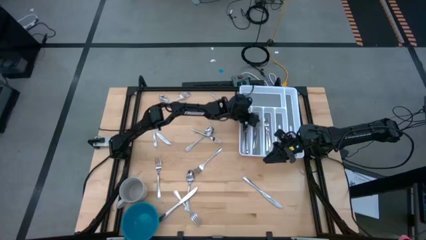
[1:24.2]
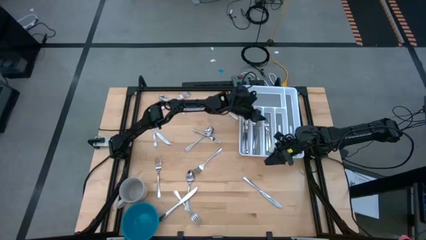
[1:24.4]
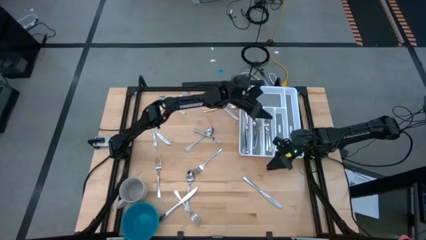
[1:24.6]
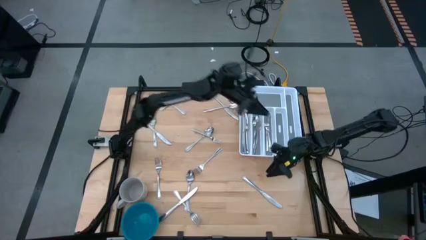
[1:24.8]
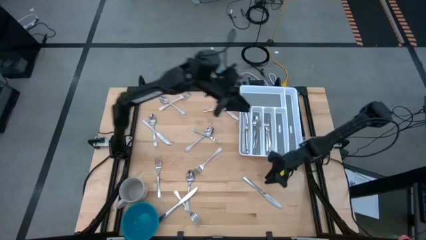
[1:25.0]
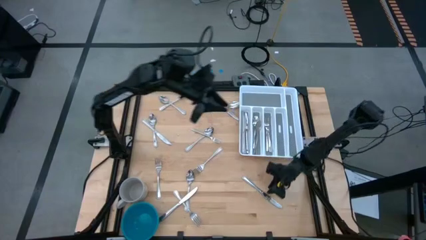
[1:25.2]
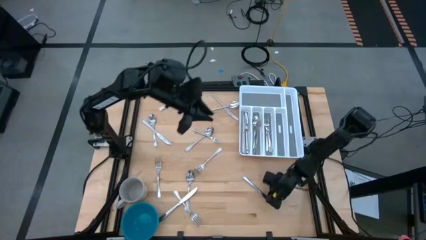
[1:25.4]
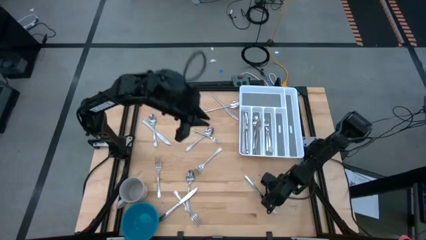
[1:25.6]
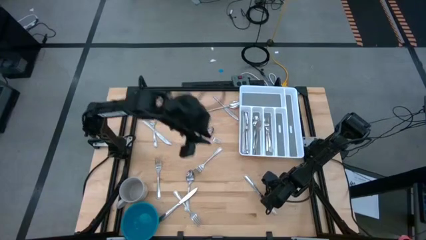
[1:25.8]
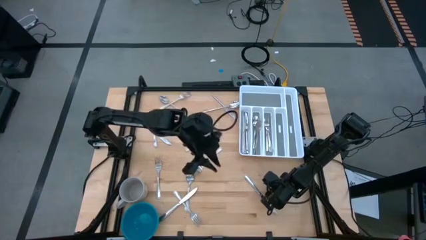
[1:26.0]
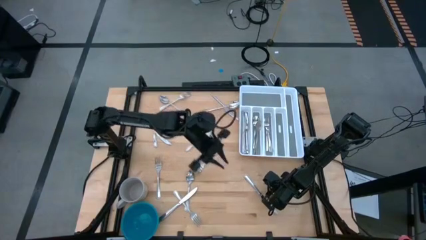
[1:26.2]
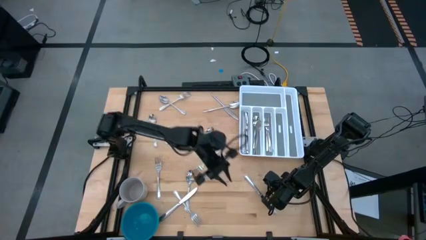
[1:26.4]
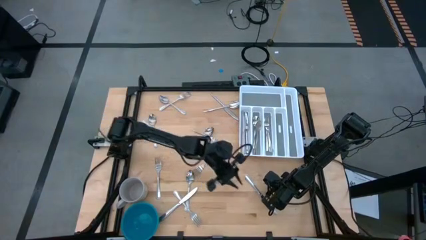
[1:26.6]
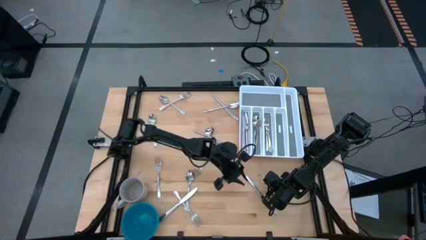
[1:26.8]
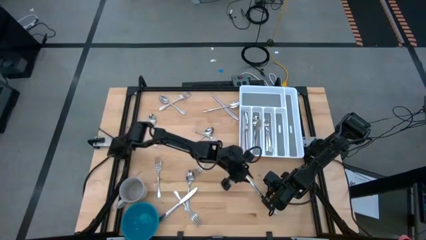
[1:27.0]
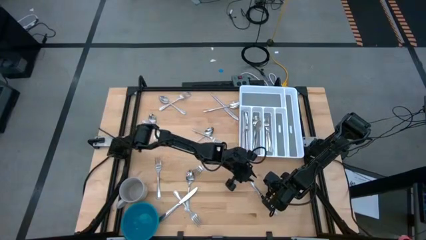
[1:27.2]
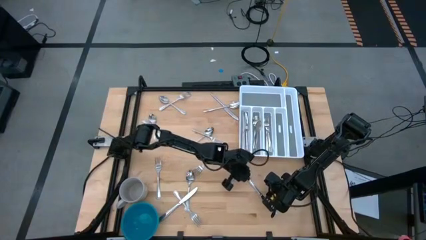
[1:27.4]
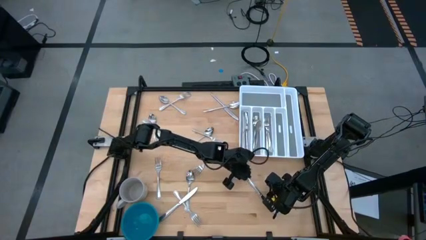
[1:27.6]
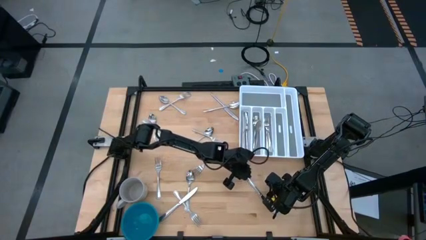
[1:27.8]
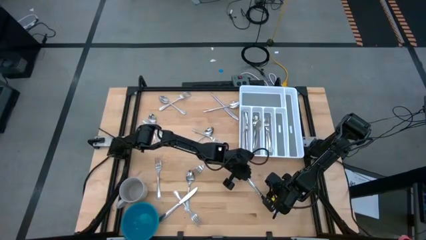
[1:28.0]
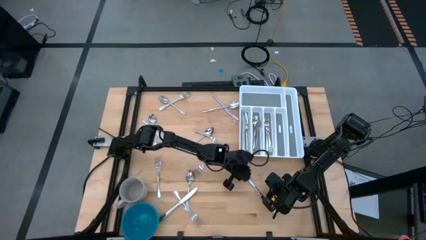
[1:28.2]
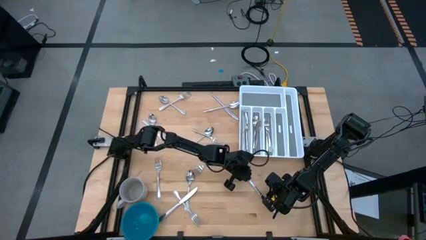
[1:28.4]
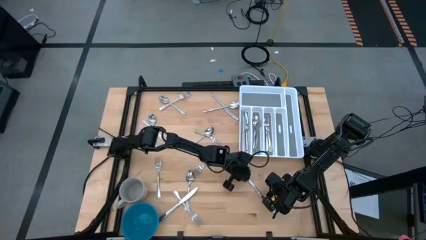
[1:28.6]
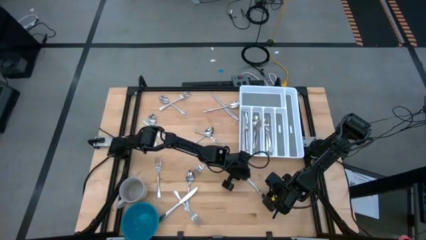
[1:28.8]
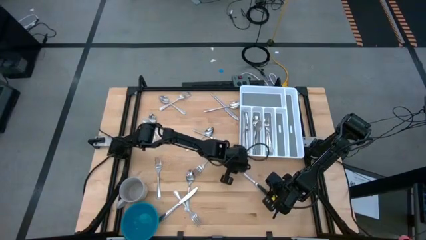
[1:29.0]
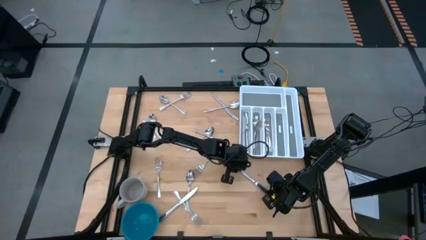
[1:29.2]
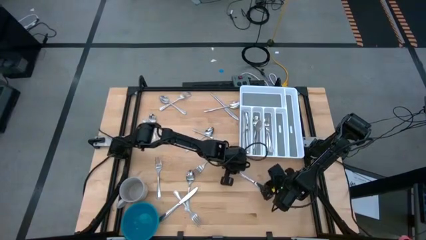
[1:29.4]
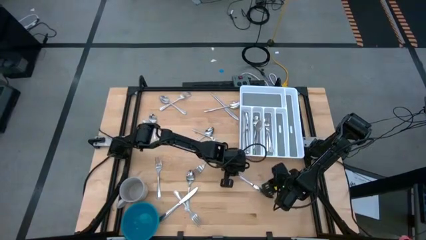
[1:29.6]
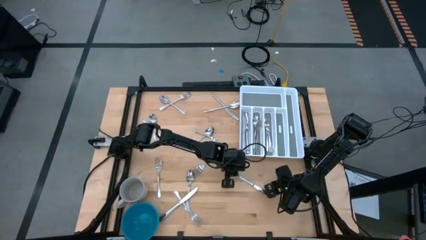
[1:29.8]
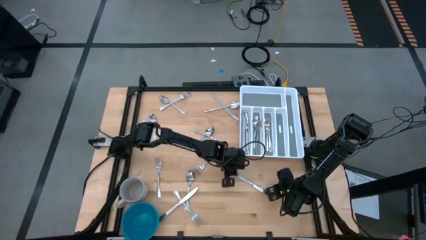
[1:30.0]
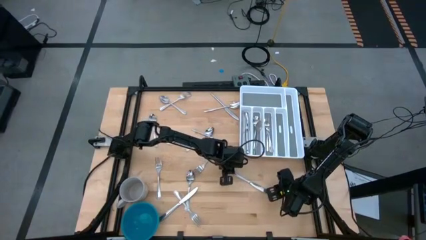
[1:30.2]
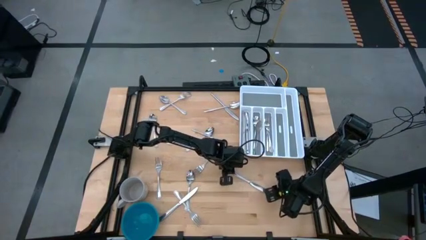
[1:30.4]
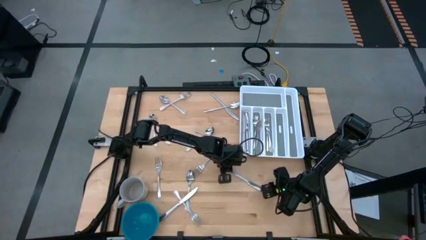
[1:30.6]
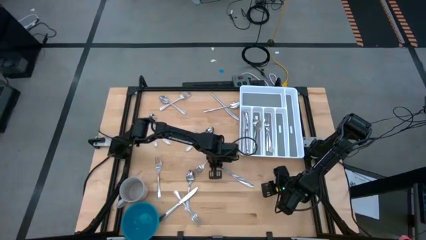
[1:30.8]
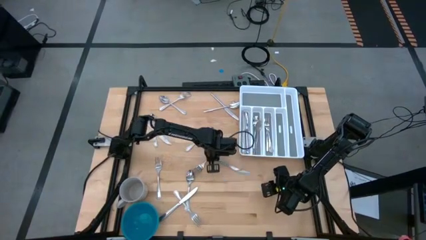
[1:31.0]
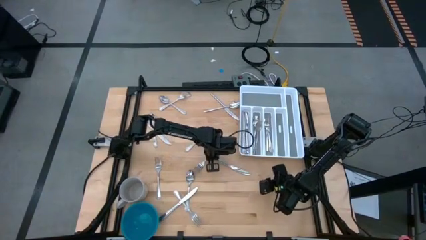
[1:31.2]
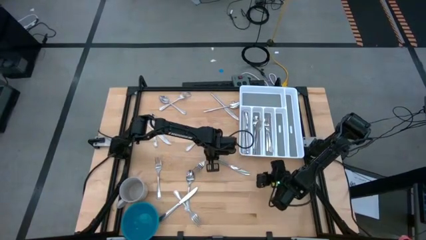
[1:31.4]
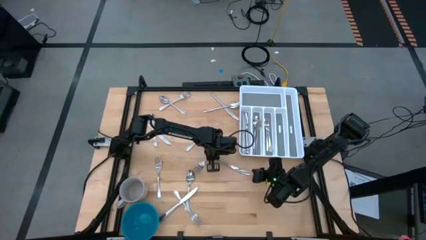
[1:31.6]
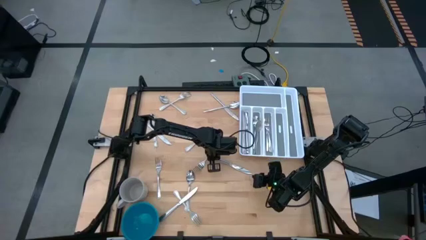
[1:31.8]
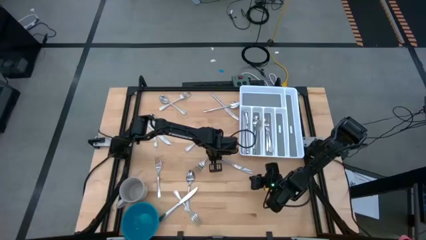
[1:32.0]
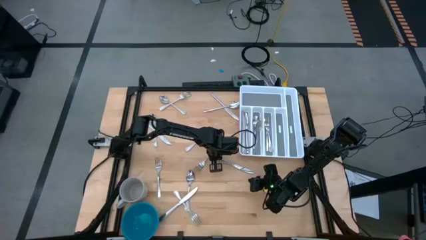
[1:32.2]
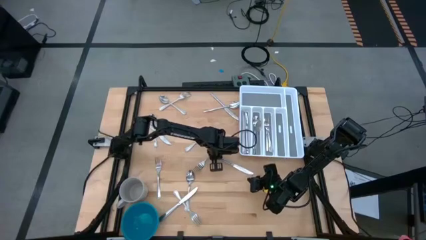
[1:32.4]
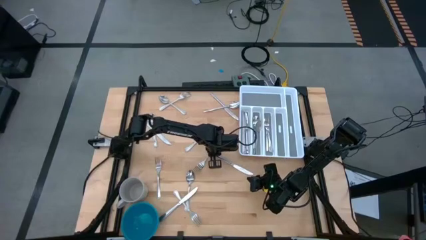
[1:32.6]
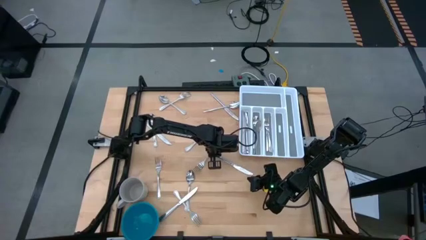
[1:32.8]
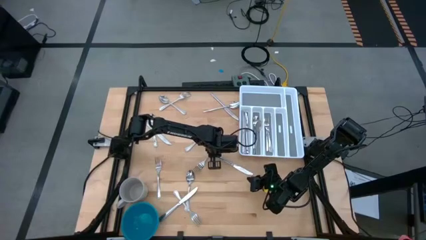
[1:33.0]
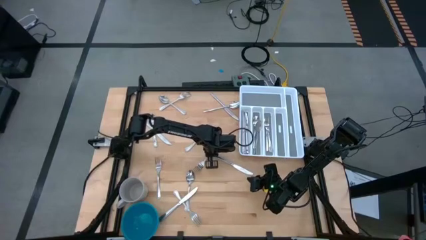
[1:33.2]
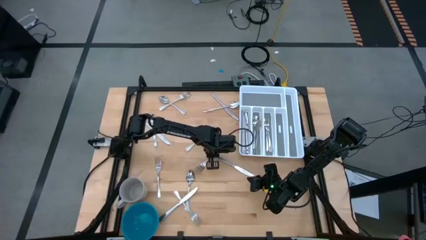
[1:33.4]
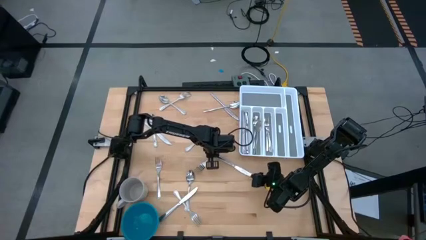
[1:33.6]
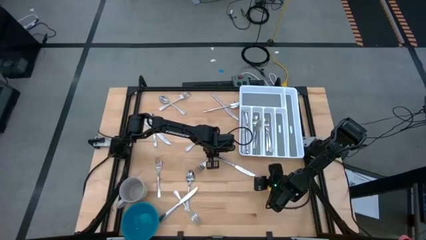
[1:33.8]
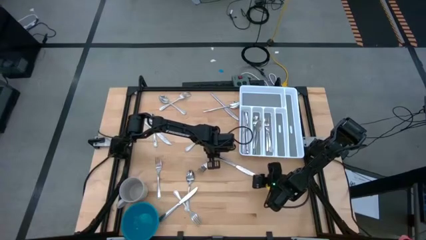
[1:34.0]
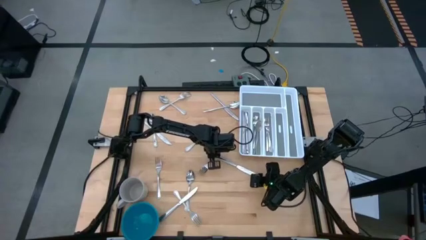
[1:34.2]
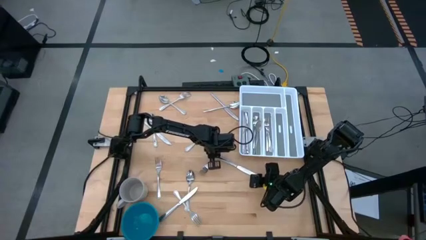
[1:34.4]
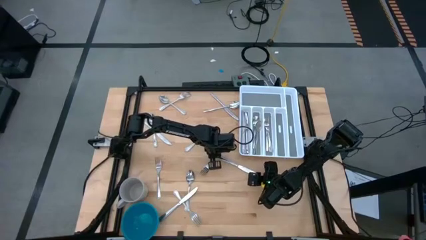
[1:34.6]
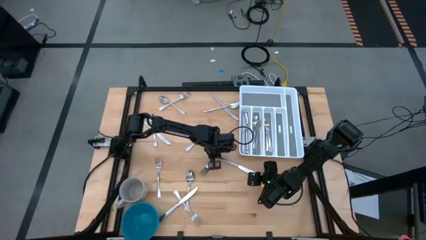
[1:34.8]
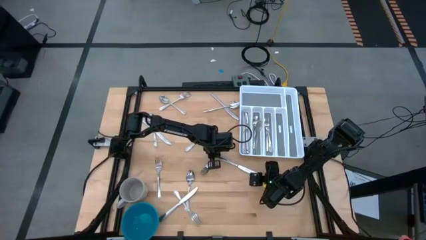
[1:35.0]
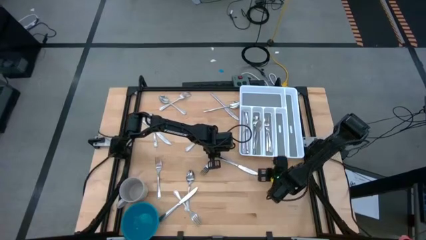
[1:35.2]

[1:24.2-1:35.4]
Task: Sort silverware
Put the table knife into the silverware tray

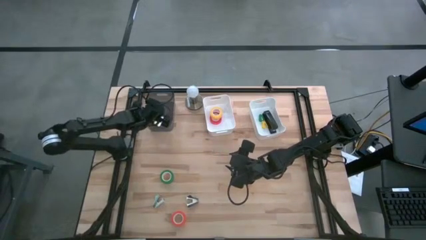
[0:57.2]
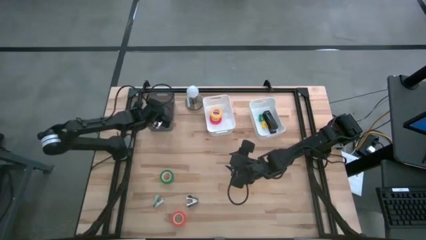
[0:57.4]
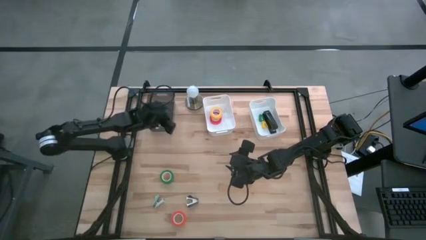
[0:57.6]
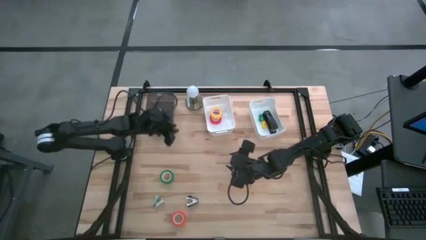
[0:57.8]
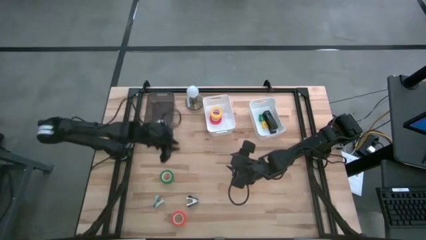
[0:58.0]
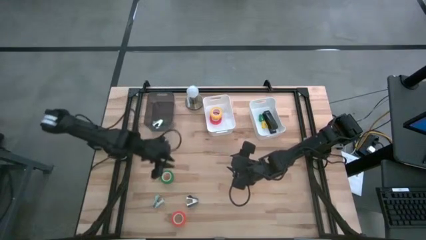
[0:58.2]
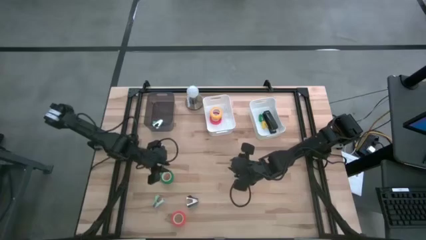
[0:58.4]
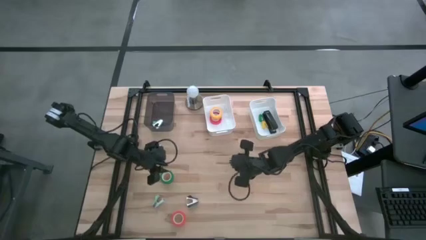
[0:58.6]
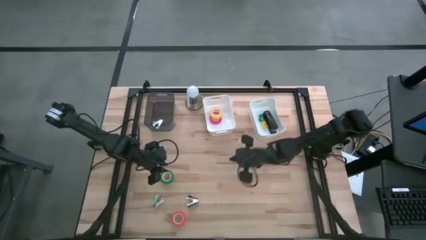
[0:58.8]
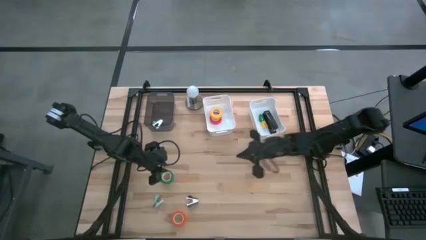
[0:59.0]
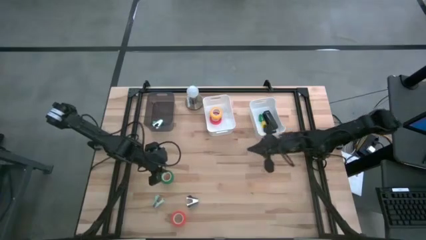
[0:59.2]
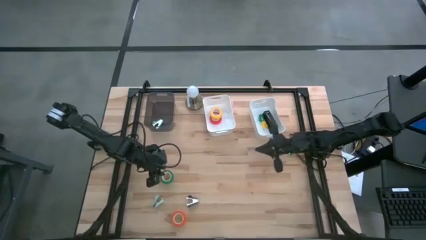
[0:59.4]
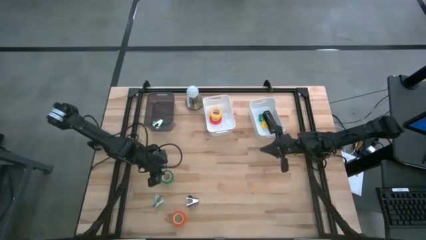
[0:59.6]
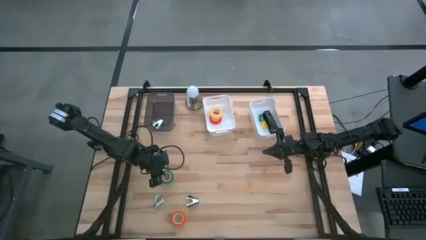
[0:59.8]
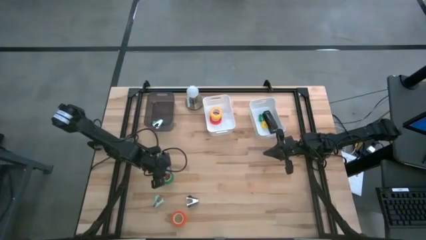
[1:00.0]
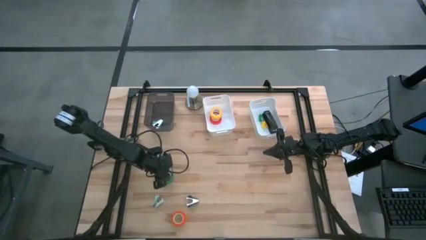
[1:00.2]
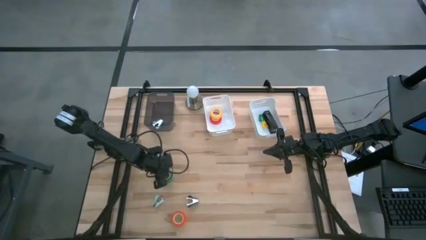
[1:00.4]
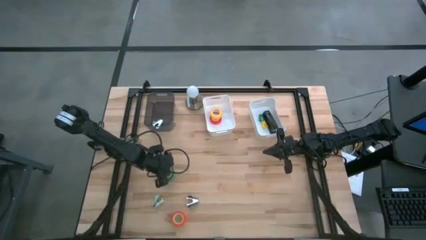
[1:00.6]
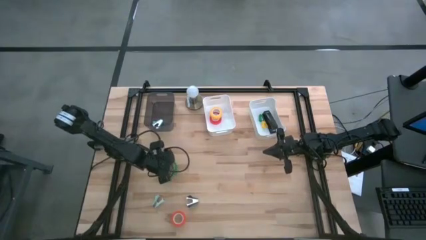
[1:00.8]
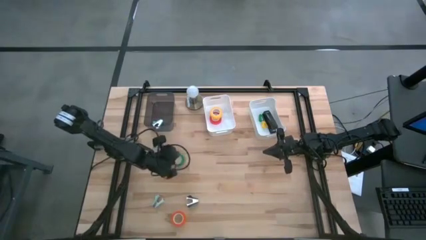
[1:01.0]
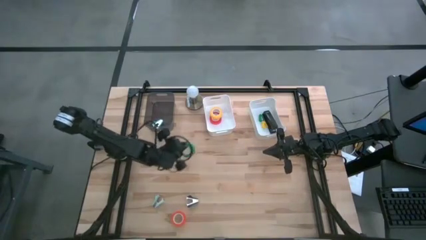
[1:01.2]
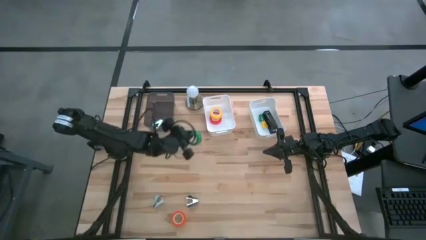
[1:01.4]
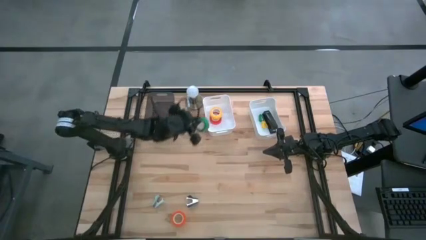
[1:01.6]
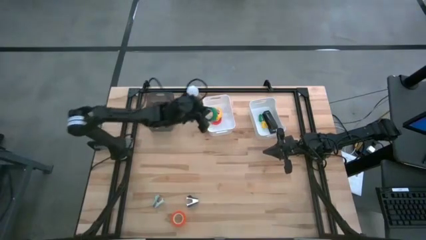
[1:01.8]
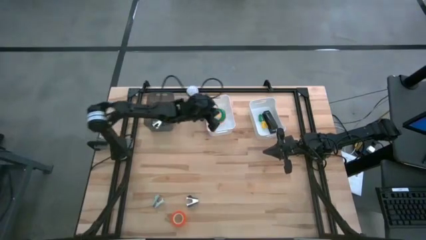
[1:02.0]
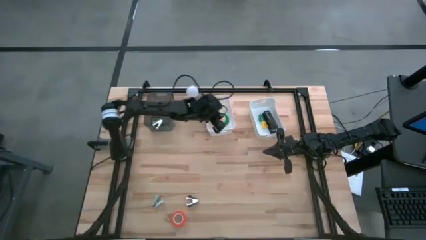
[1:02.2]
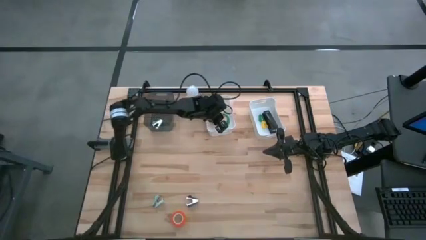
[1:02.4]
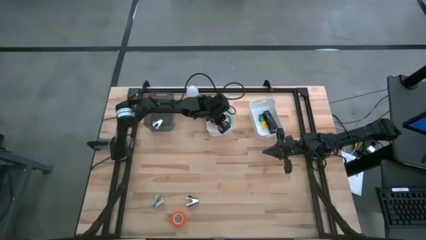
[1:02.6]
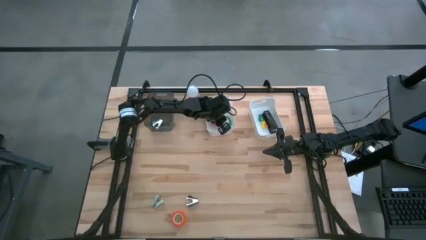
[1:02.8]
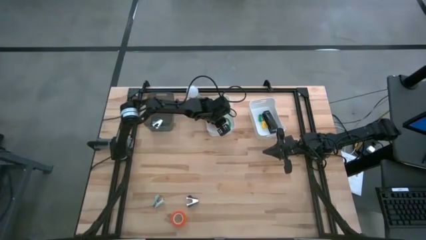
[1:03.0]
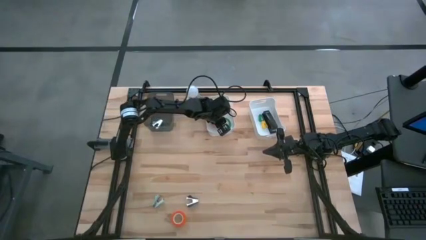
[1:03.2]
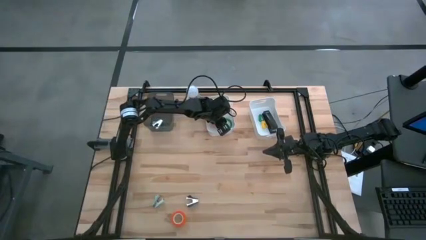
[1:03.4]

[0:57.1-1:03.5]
Task: Pick and place Stapler, Stapler remover, tape
Put the green masking tape into the left white bin
